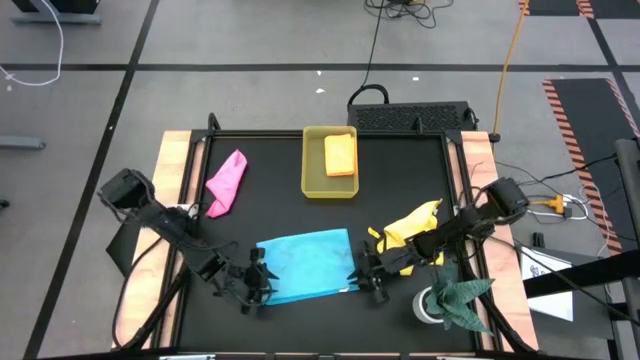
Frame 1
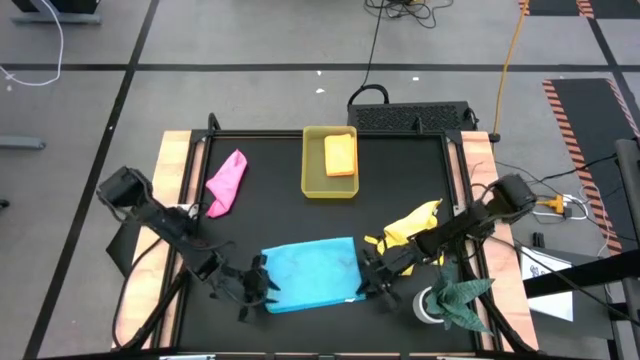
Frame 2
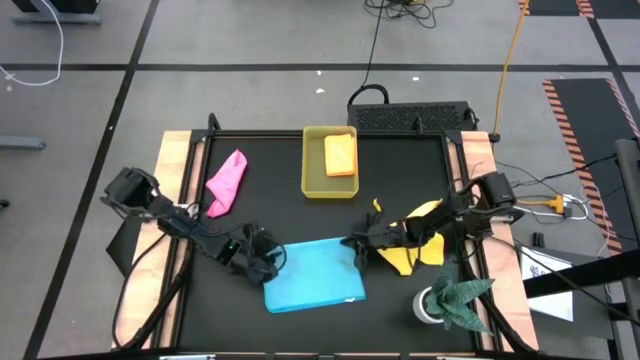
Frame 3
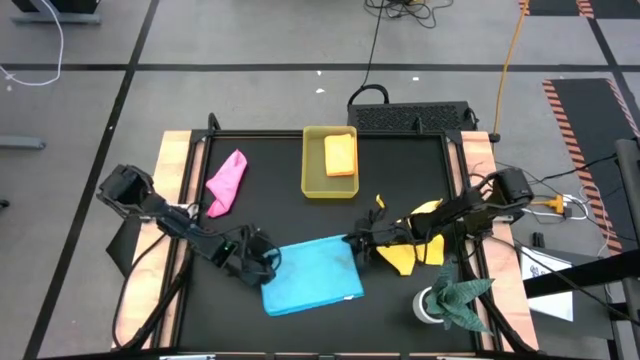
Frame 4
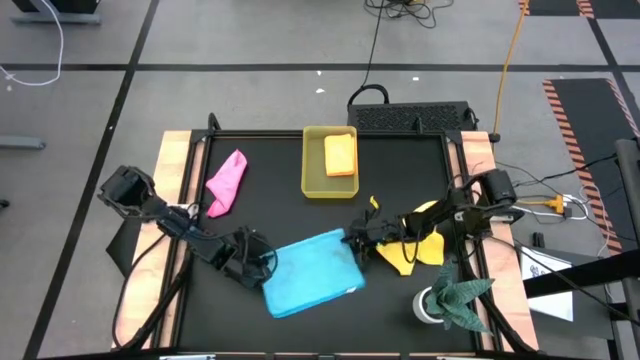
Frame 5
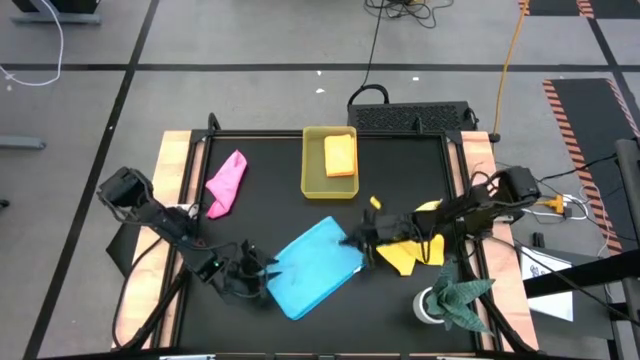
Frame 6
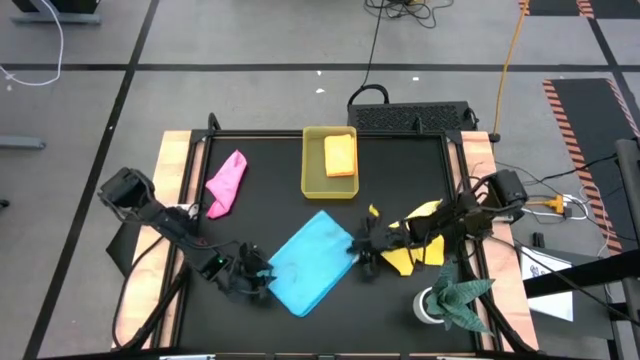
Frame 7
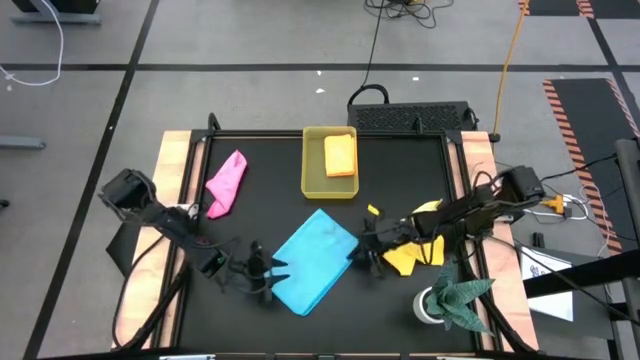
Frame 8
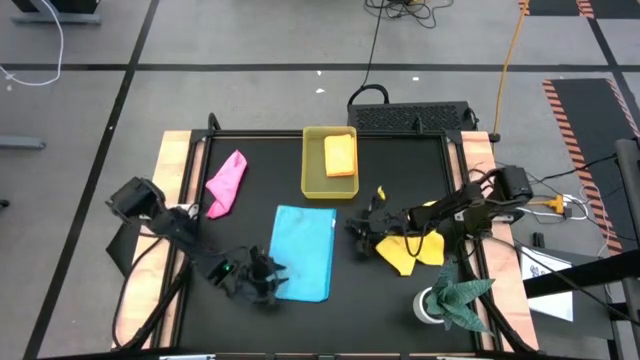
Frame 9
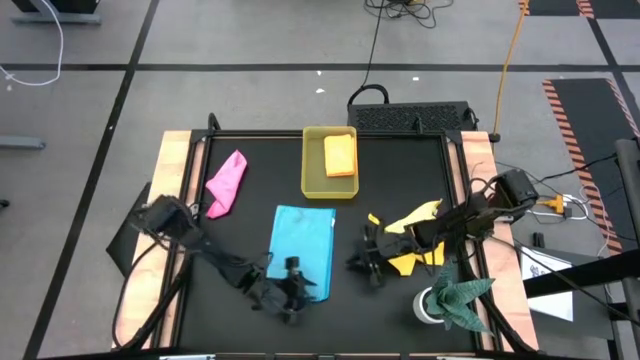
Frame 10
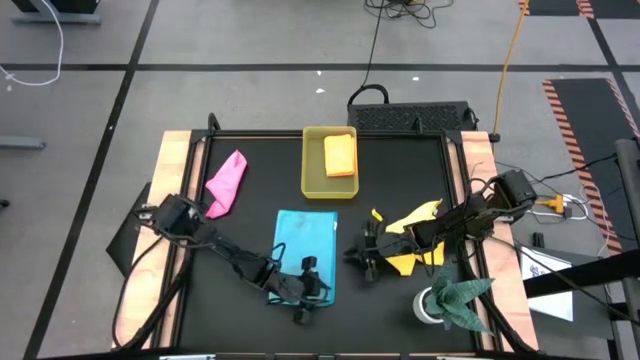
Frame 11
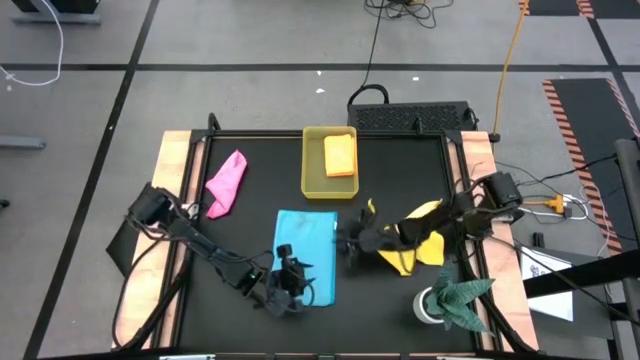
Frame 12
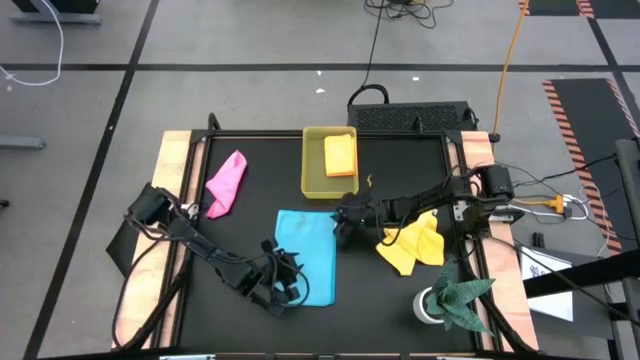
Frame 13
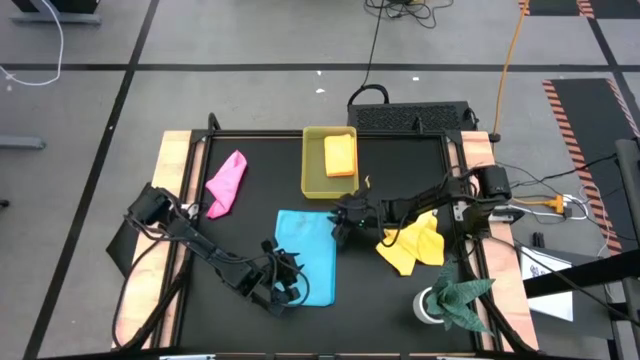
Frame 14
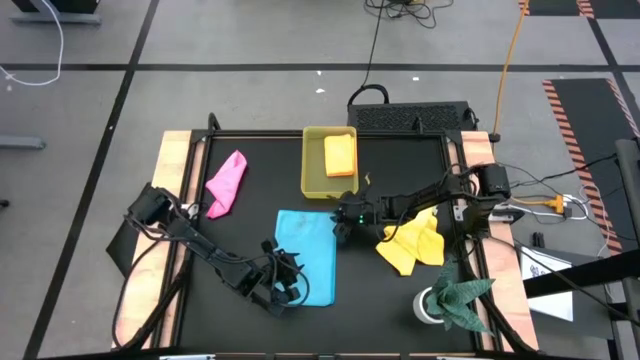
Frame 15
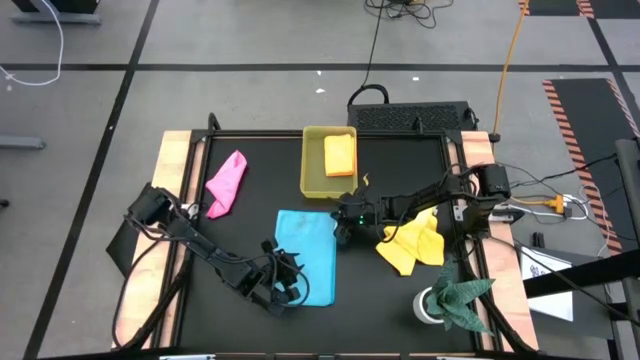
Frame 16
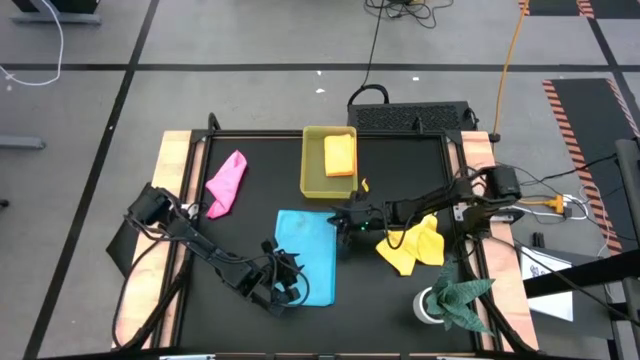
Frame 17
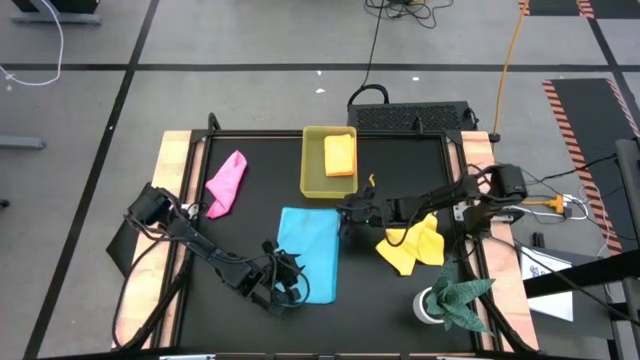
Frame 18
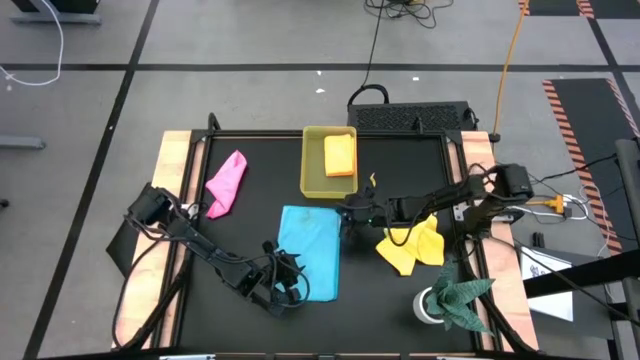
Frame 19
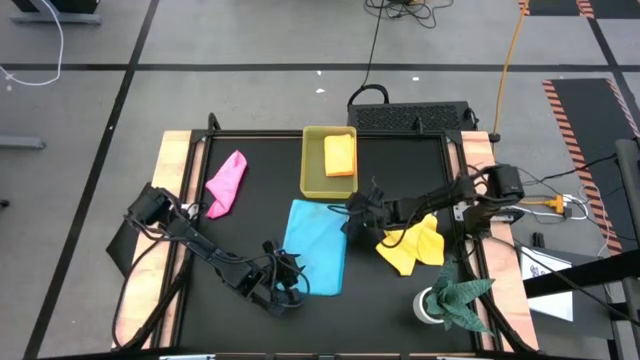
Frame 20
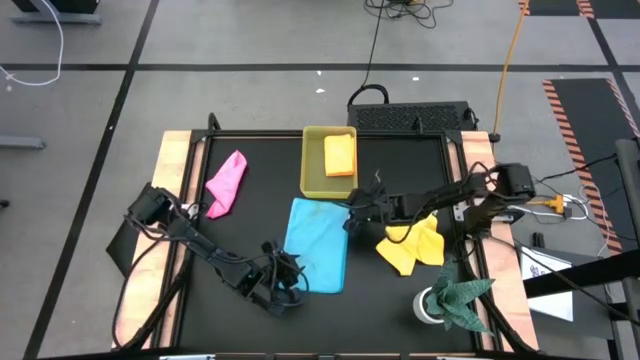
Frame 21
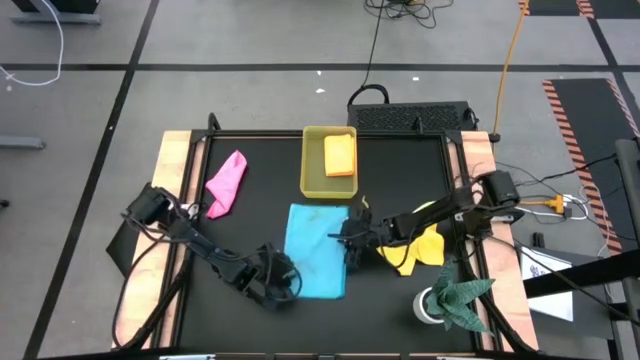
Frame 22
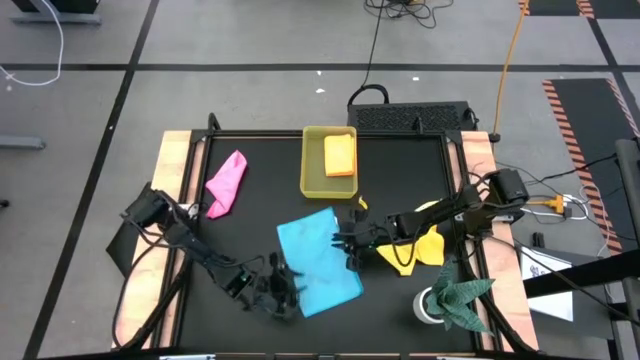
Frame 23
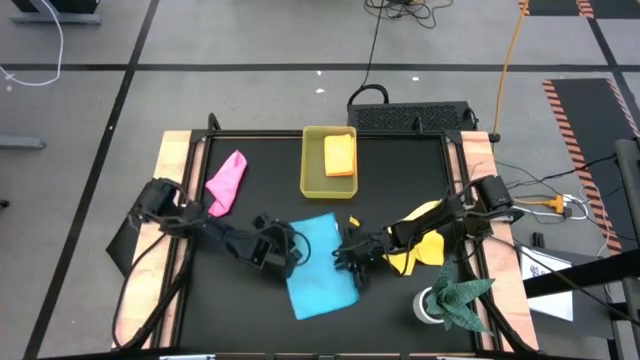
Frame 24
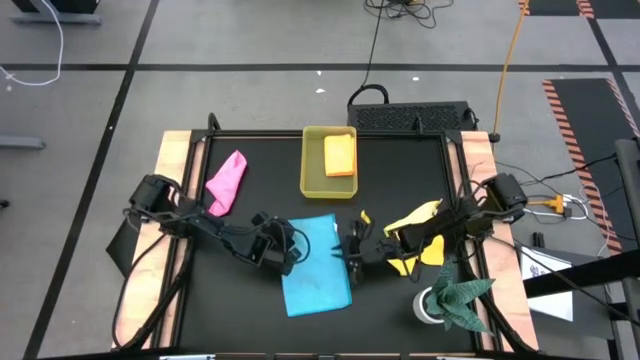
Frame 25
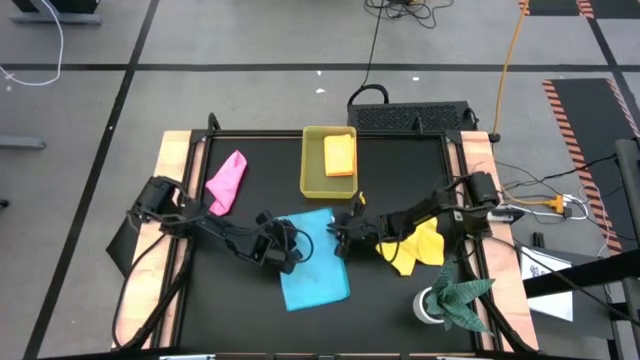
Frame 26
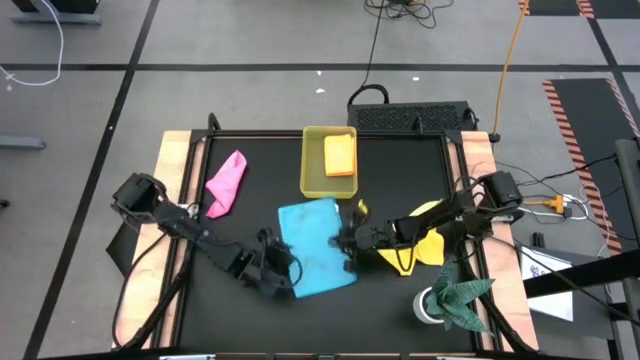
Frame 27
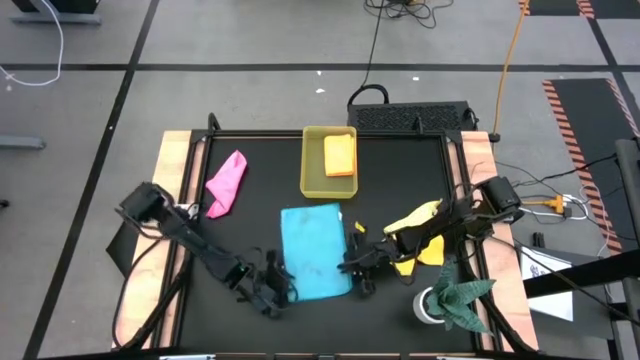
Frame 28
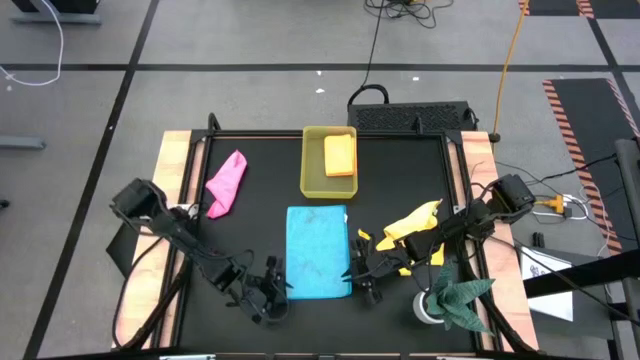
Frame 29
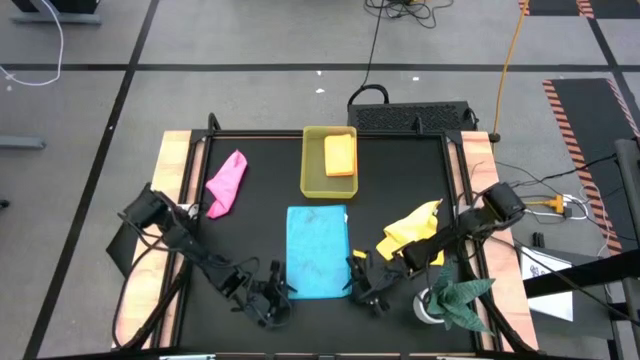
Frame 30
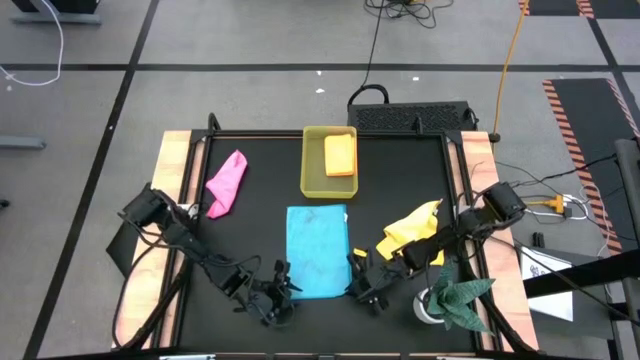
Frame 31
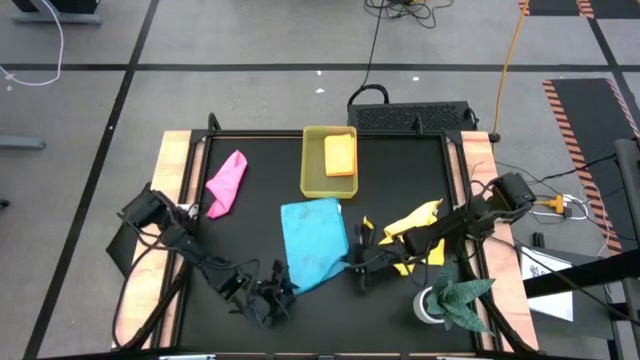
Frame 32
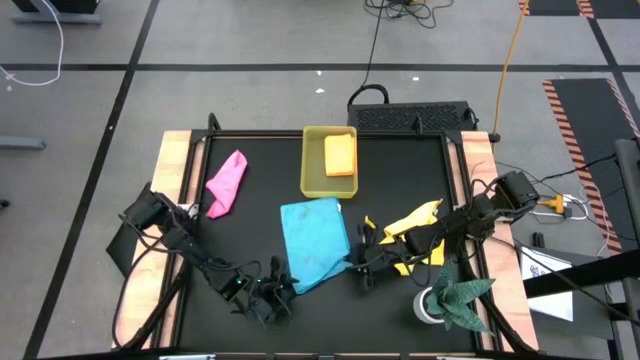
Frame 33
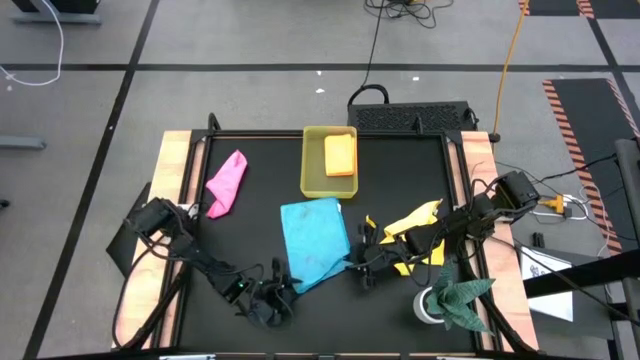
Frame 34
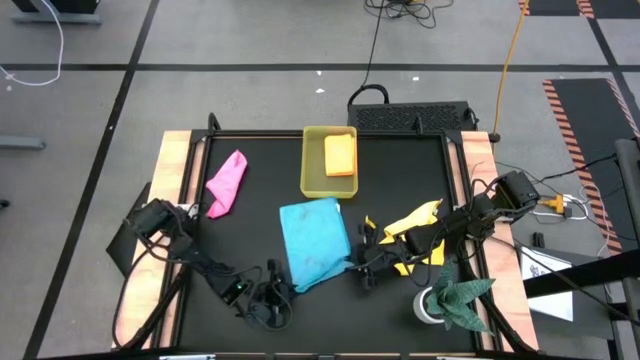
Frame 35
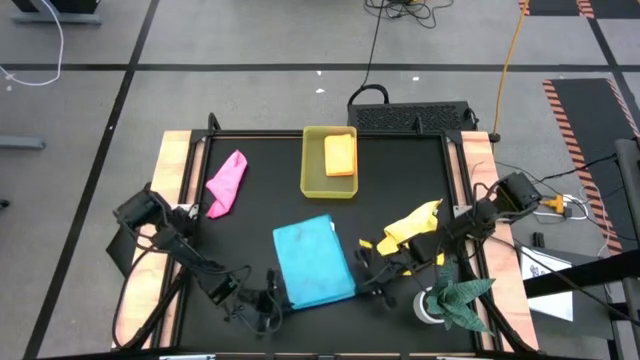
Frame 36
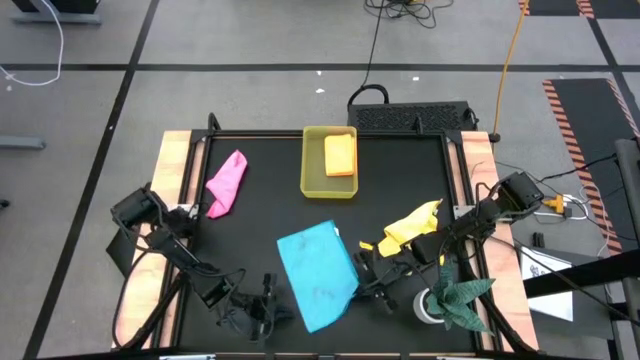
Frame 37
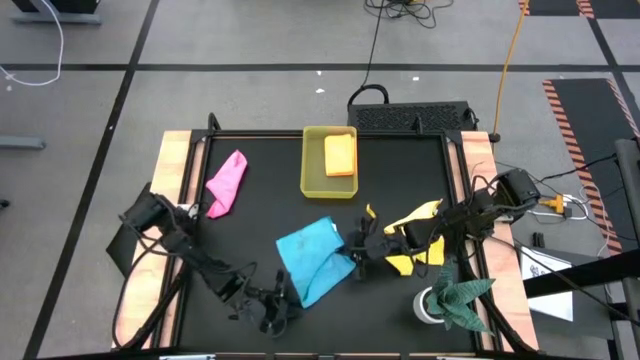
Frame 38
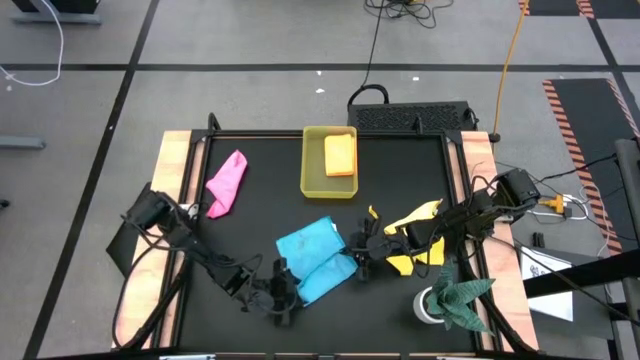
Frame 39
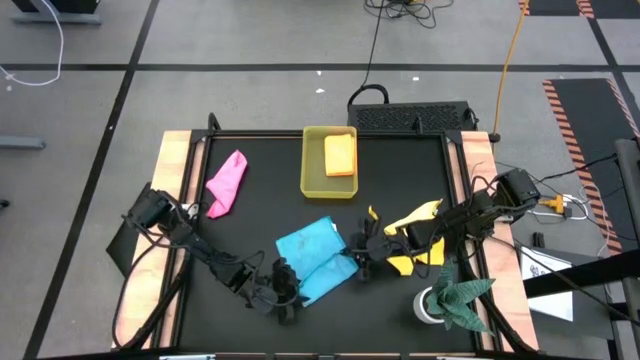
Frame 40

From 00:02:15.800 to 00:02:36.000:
Task: Fold microfiber towels
Fold the blue towel
